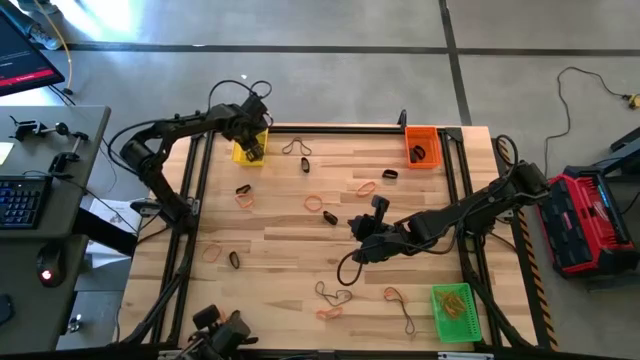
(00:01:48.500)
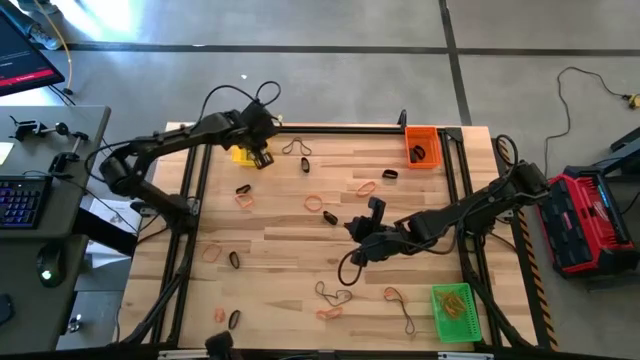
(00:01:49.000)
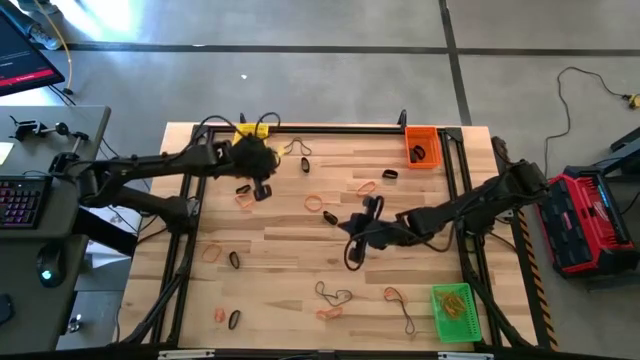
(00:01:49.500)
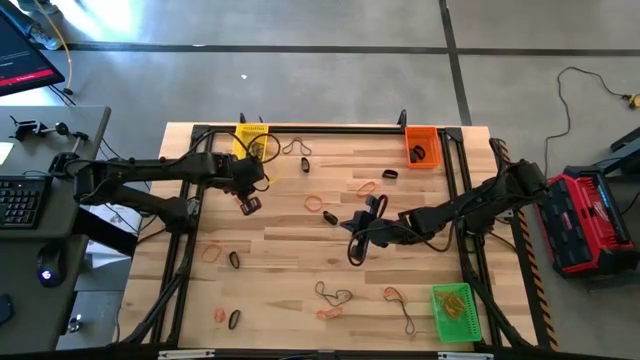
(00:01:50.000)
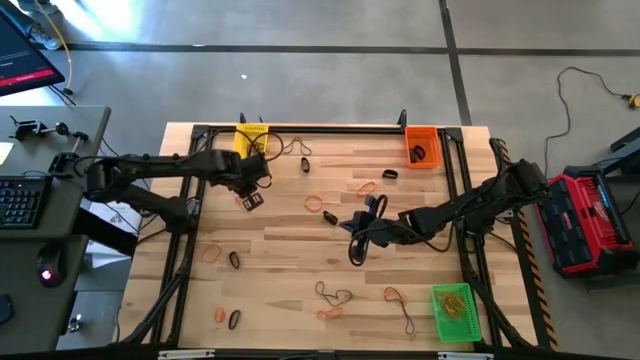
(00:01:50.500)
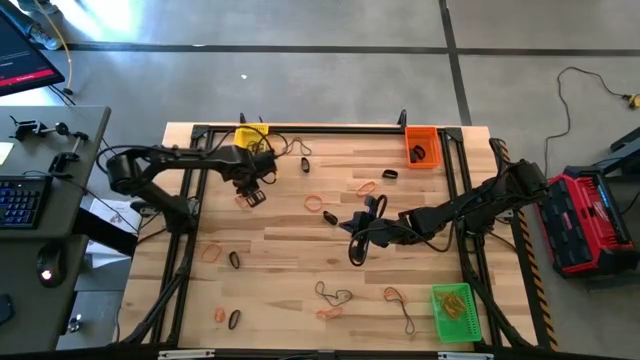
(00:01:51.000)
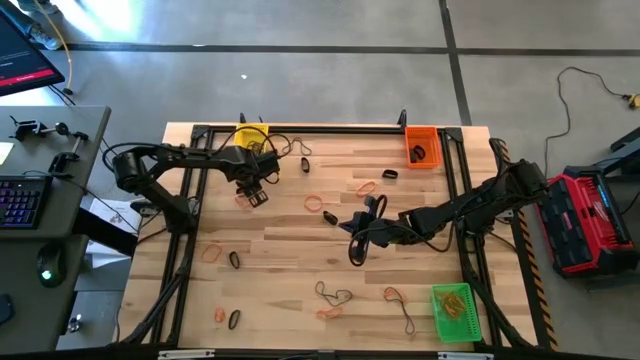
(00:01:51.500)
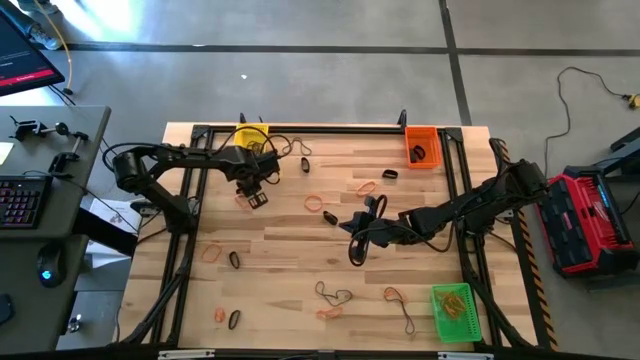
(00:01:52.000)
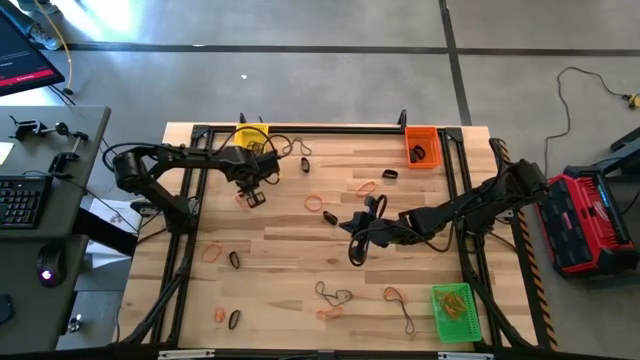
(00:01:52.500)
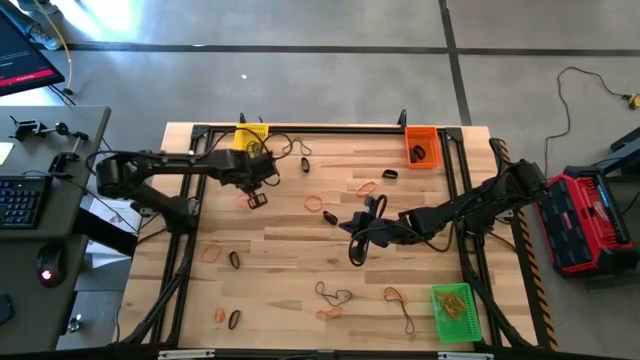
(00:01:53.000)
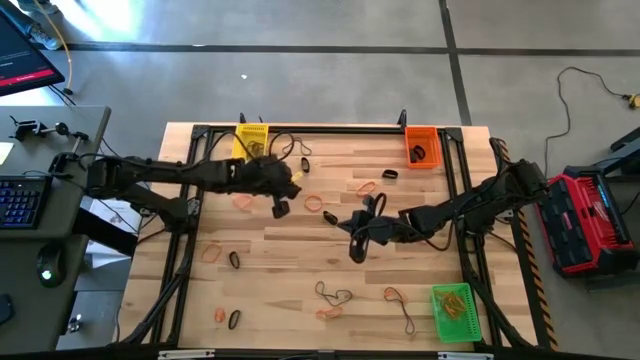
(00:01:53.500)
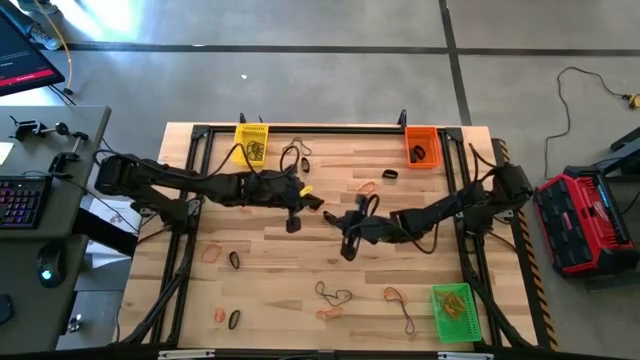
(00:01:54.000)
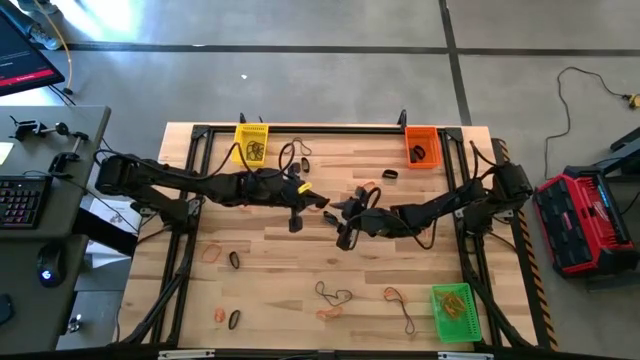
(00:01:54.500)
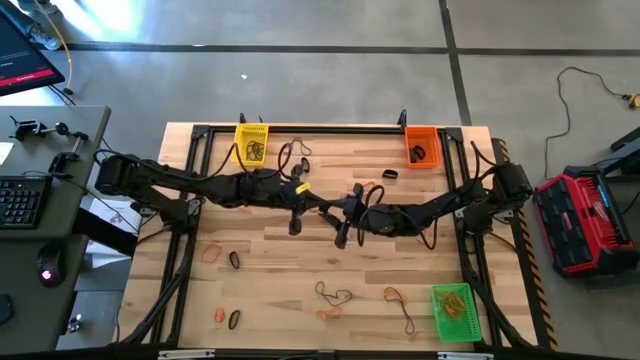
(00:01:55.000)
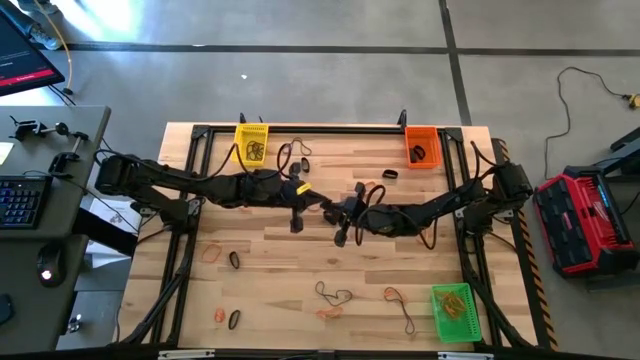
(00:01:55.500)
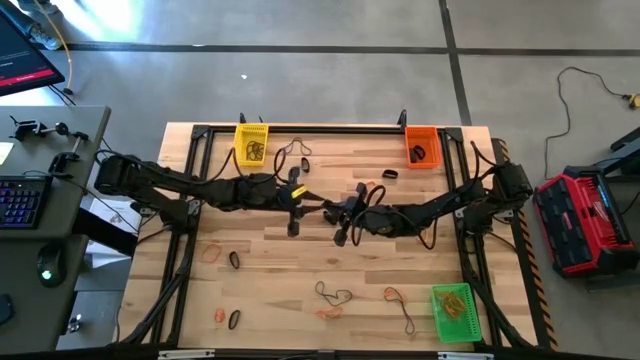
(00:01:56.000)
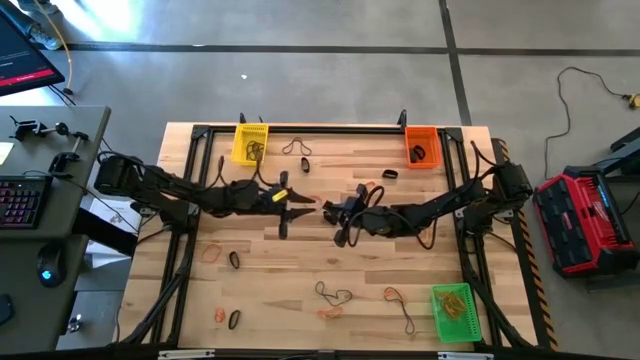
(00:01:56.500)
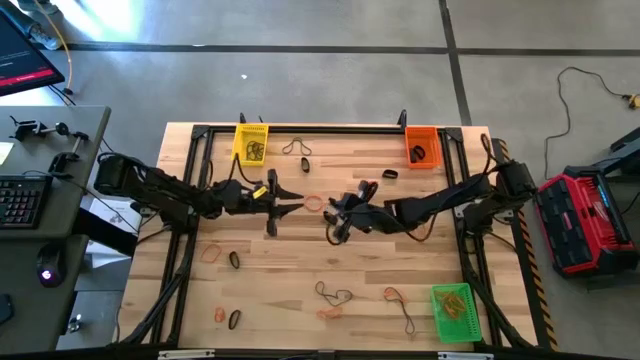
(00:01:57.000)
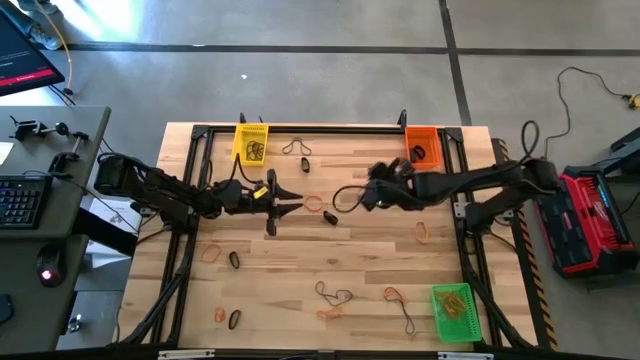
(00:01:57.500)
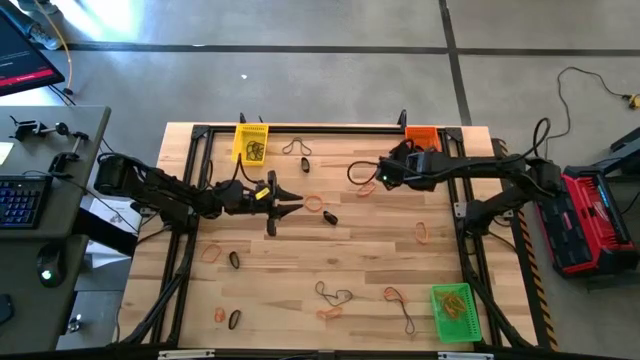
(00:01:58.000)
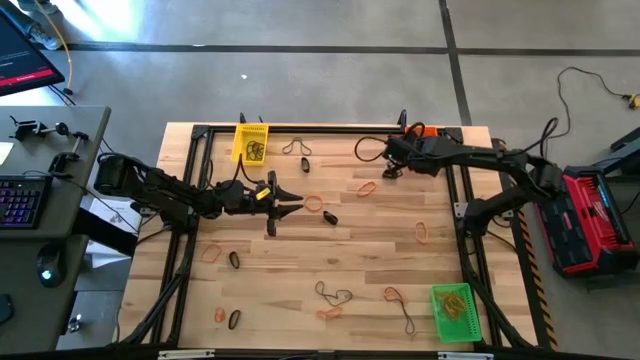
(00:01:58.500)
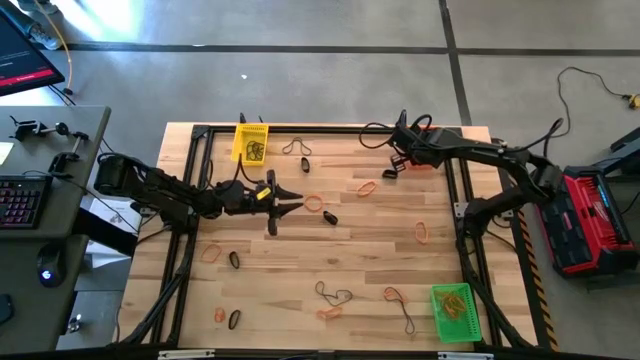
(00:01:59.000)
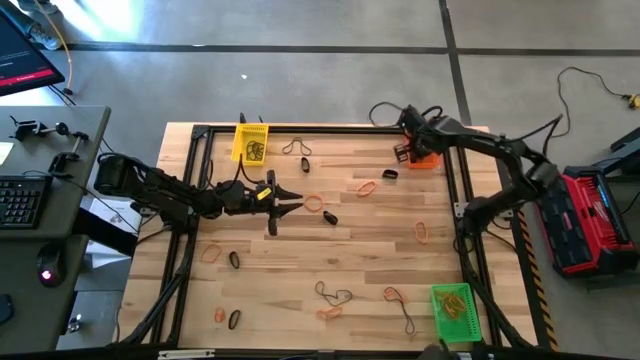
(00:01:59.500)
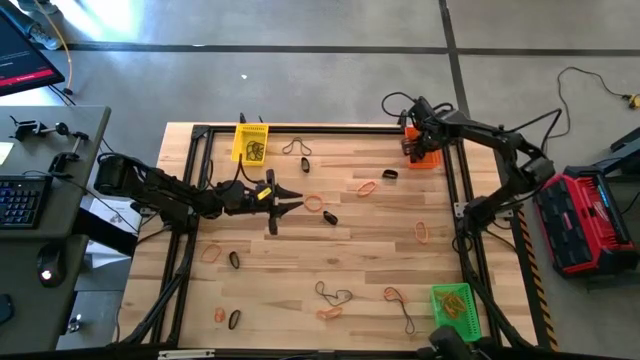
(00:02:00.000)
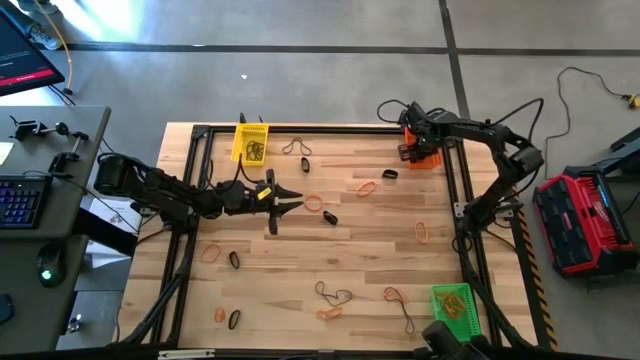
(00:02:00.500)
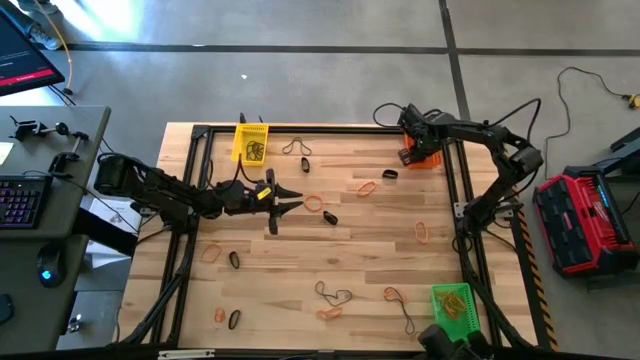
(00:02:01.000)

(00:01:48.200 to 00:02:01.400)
Task: Sort rubber bands into baskets
Put the black rubber band into the orange bin

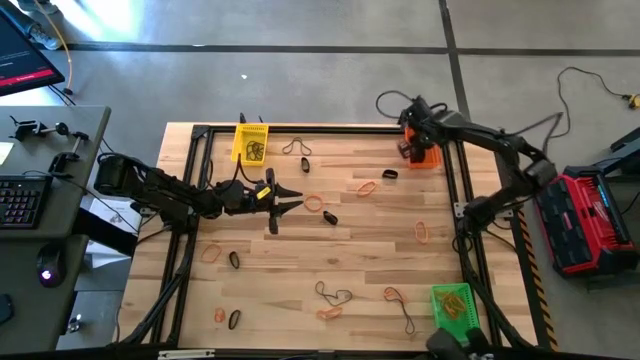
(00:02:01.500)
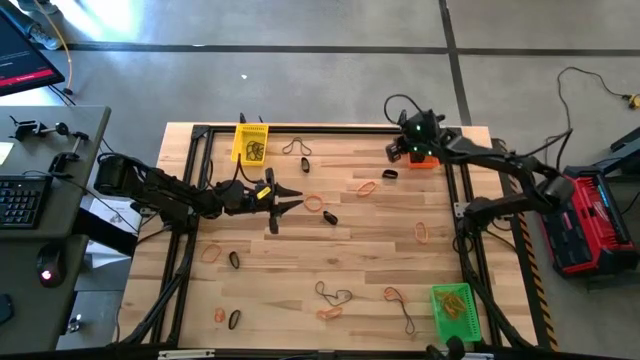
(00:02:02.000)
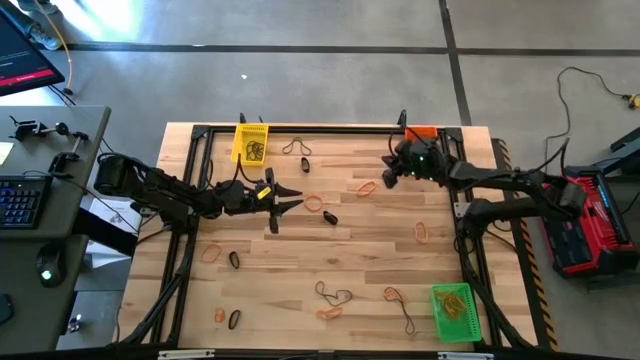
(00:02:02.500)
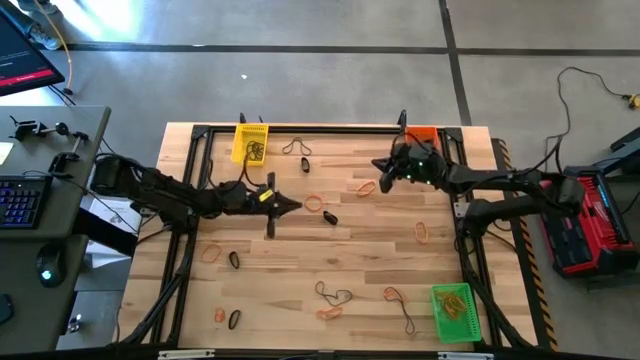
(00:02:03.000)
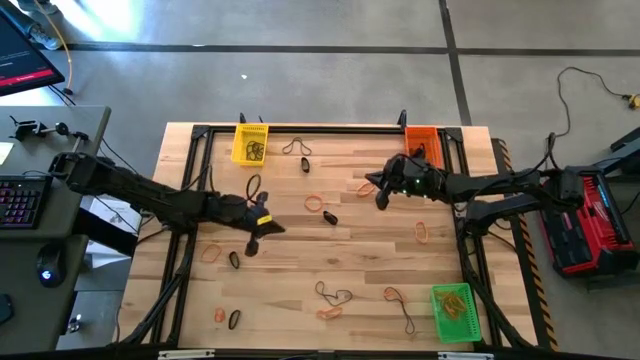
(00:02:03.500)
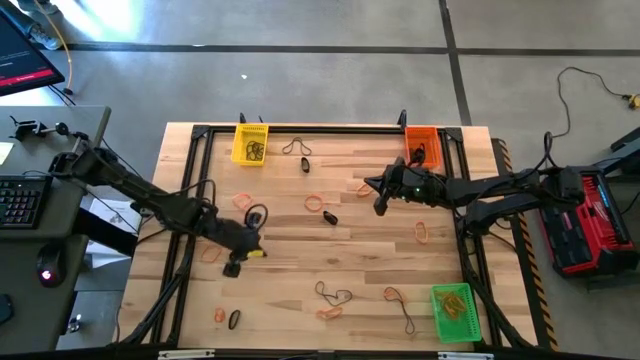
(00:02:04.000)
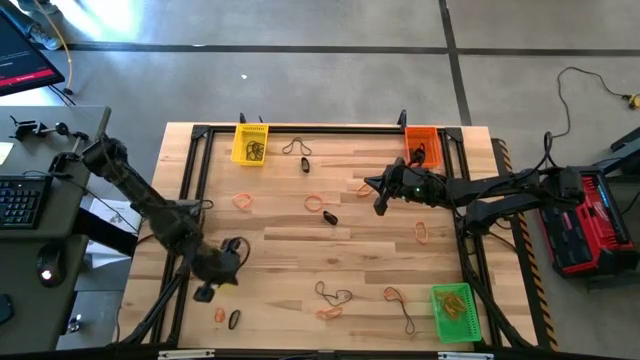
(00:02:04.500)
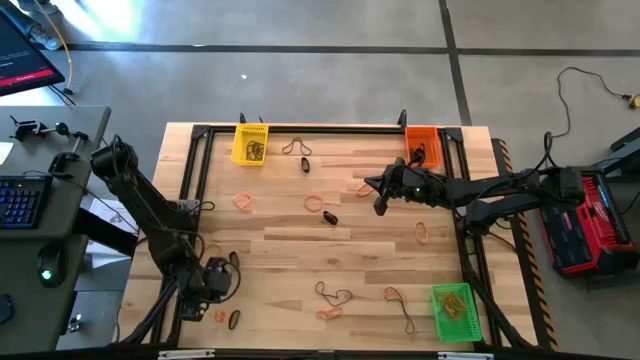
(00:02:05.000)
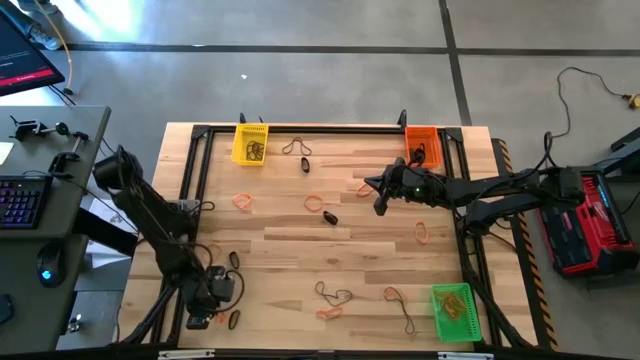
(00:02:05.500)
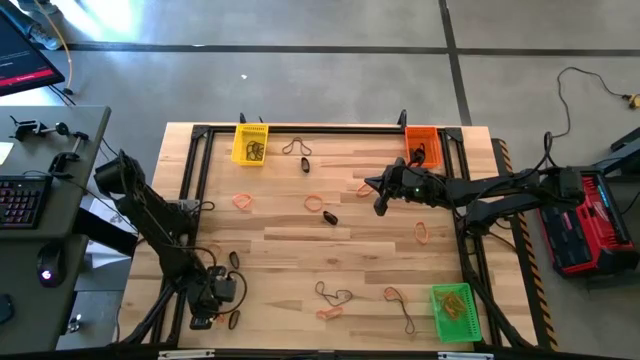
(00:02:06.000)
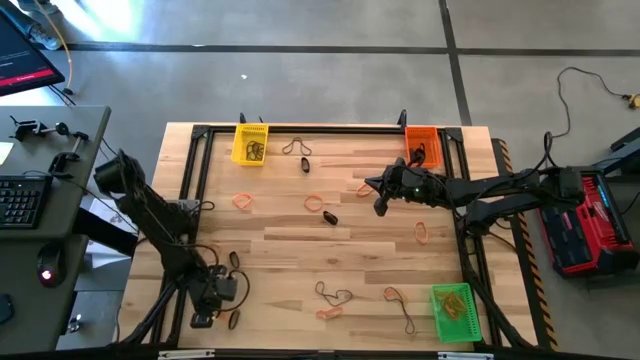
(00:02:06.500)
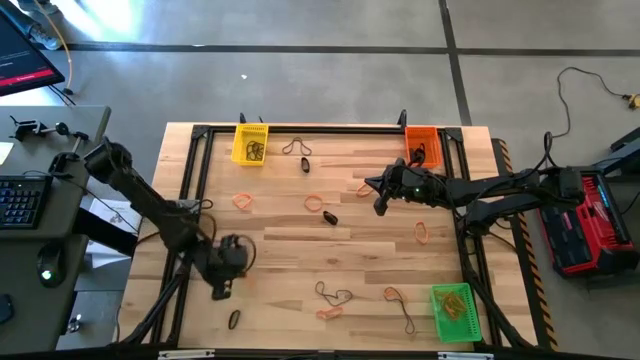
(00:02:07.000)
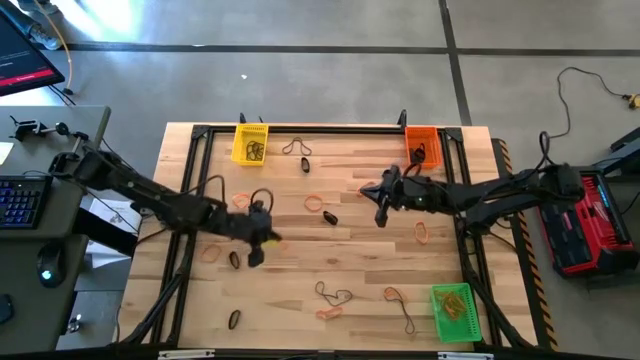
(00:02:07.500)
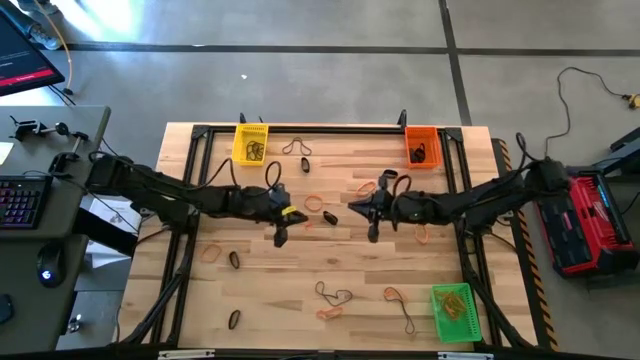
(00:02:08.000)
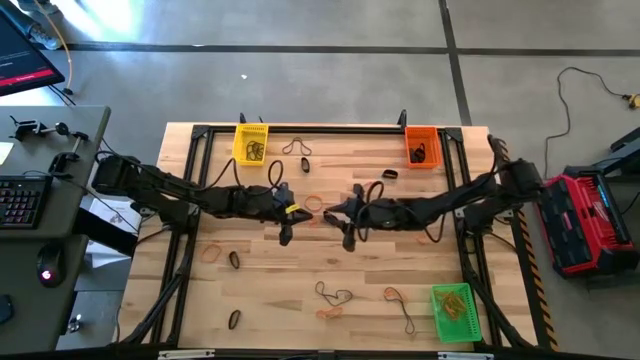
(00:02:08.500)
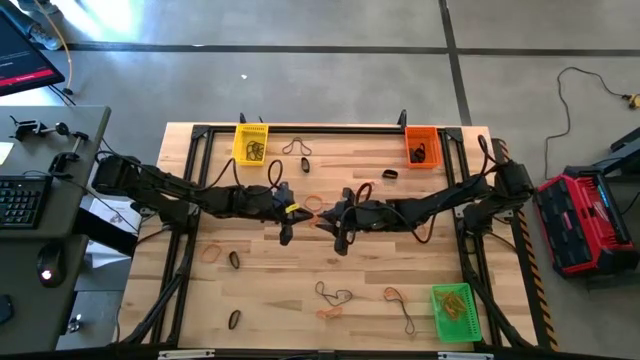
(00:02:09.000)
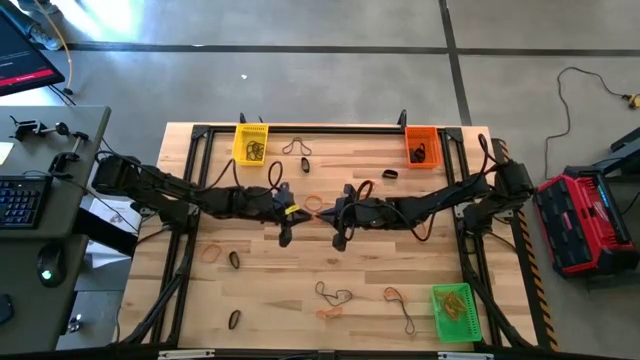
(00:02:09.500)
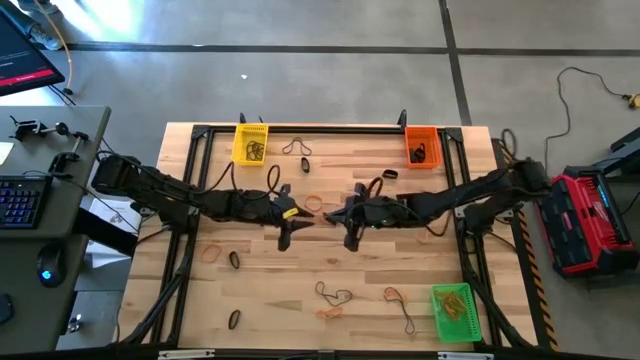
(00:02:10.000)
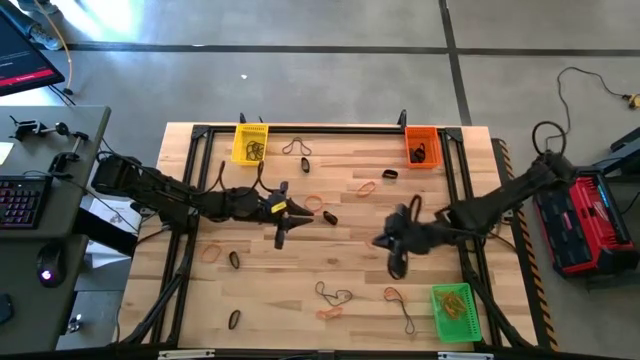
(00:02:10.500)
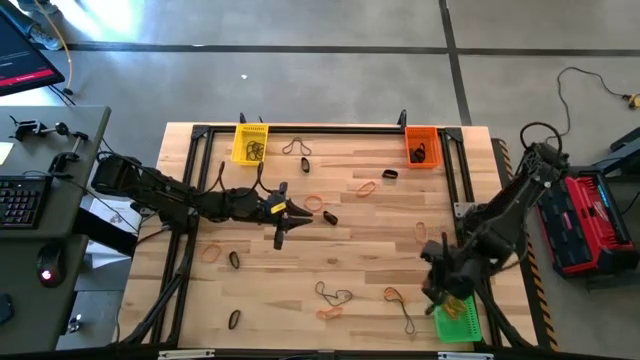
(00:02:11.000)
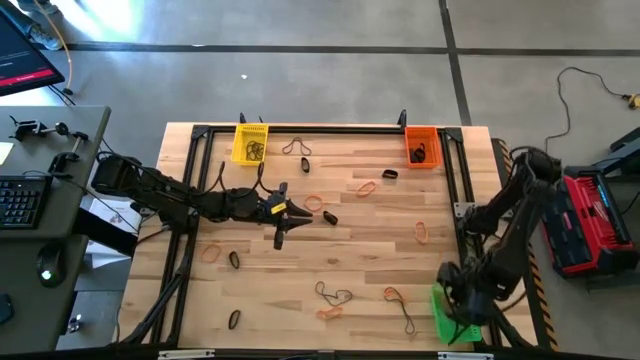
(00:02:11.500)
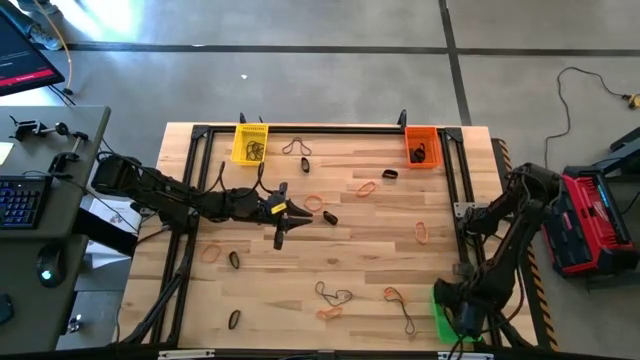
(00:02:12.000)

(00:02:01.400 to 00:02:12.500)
Put the orange rubber band into the green bin
